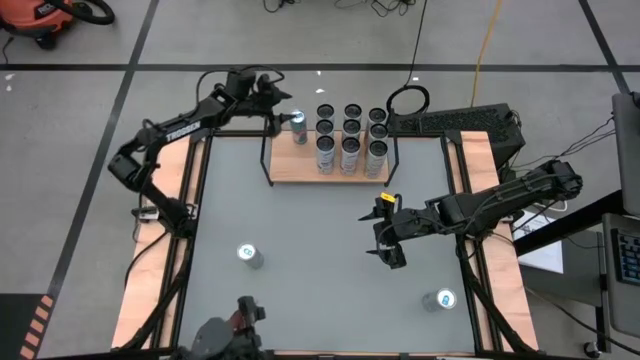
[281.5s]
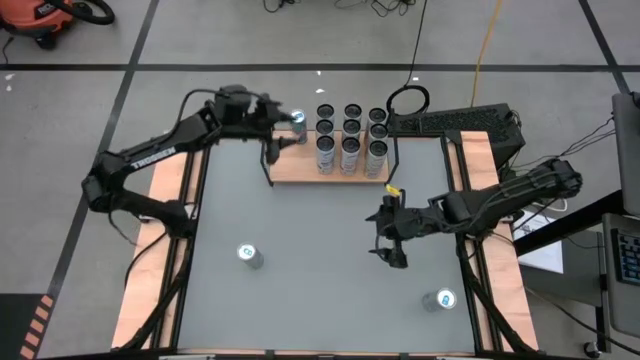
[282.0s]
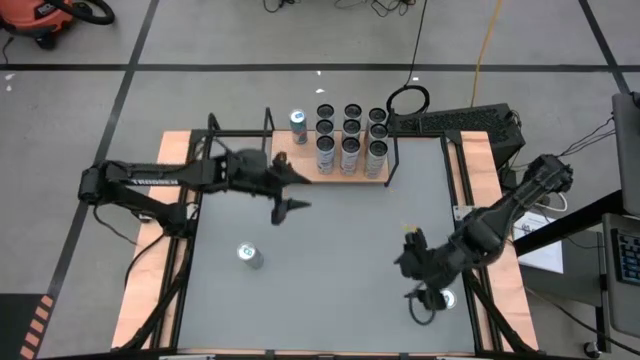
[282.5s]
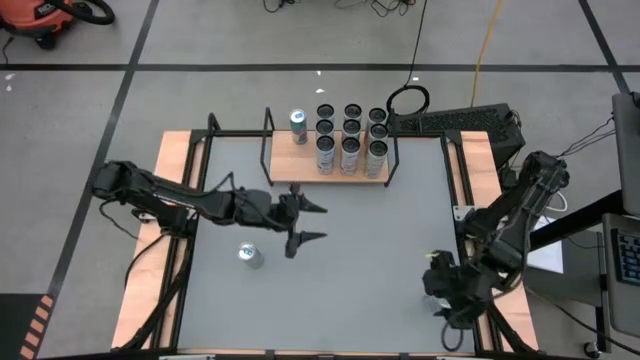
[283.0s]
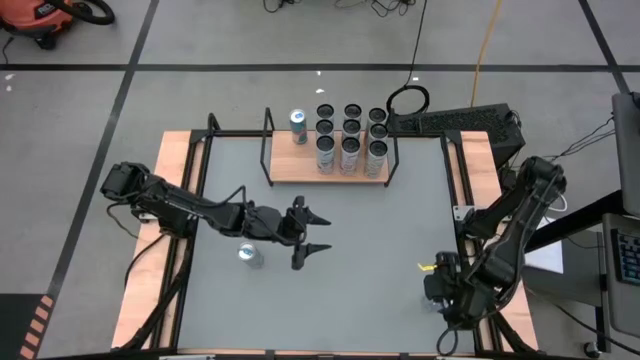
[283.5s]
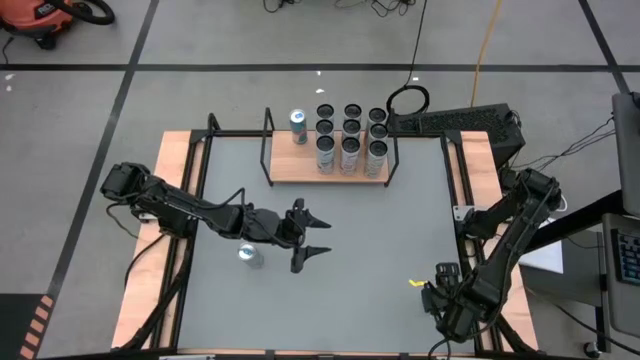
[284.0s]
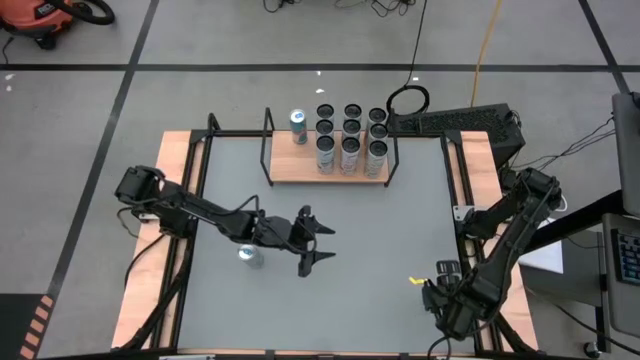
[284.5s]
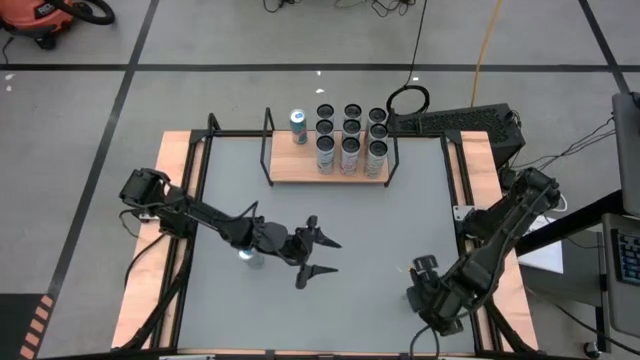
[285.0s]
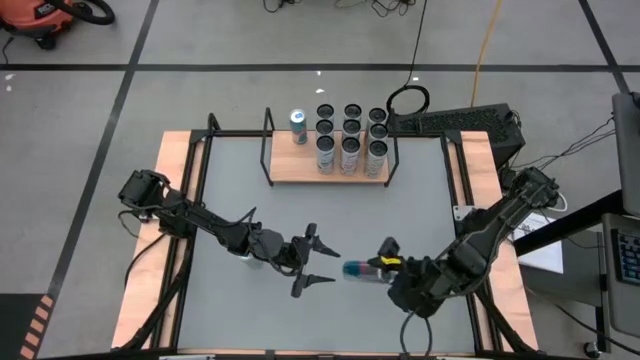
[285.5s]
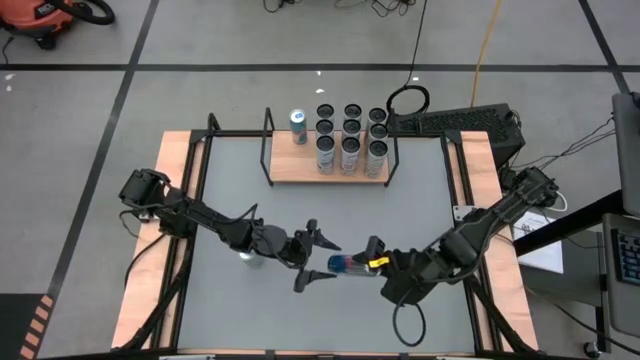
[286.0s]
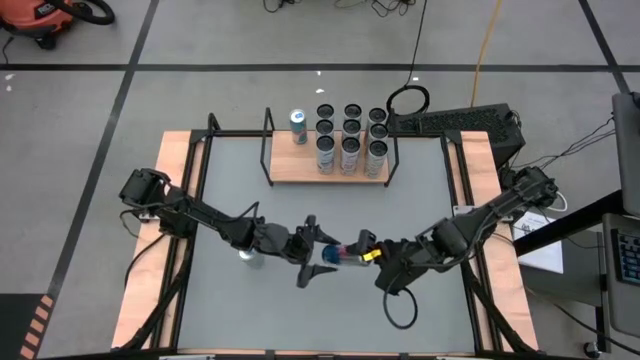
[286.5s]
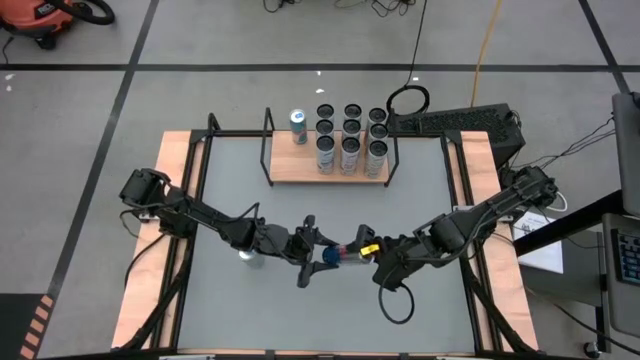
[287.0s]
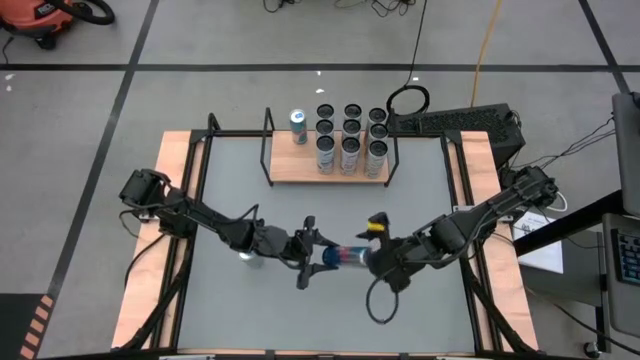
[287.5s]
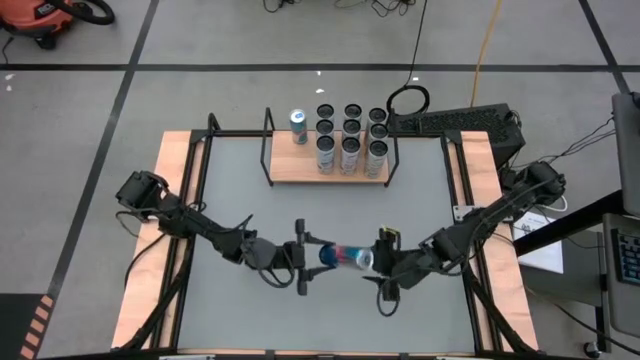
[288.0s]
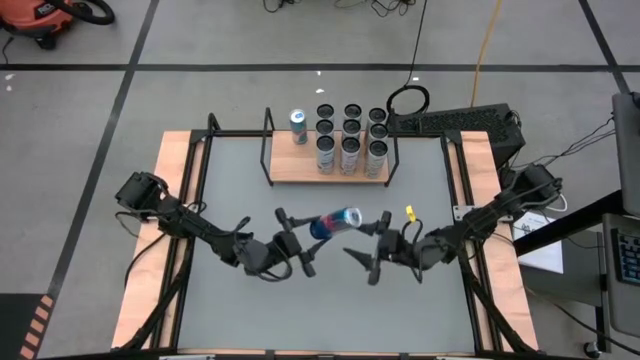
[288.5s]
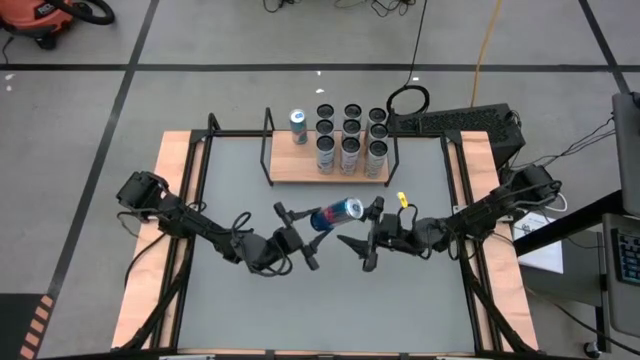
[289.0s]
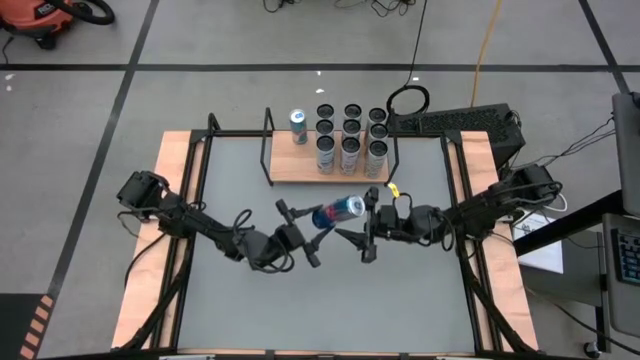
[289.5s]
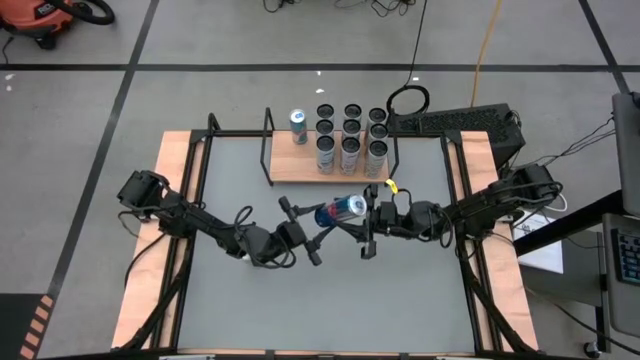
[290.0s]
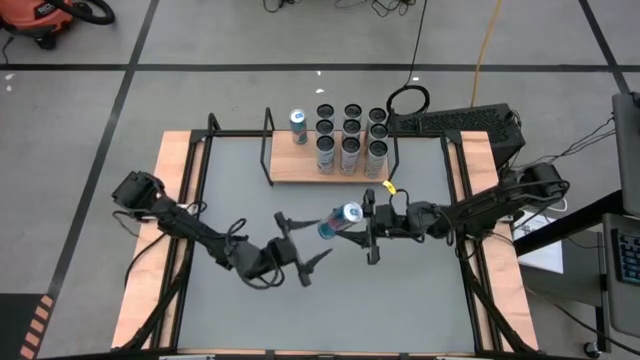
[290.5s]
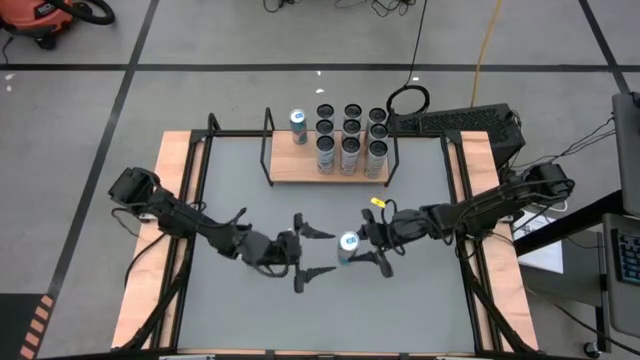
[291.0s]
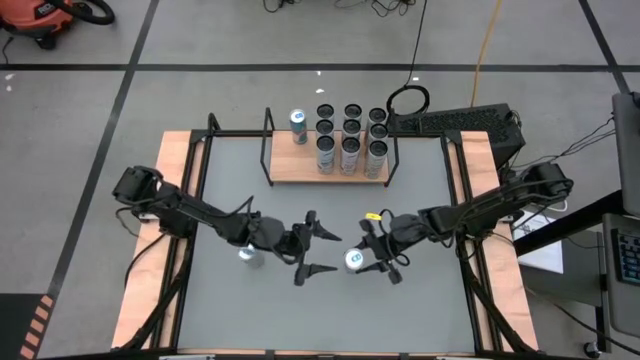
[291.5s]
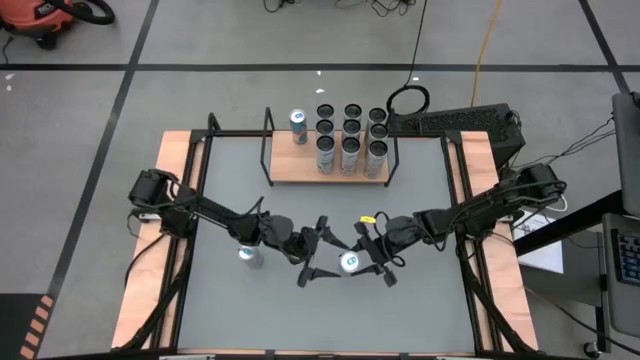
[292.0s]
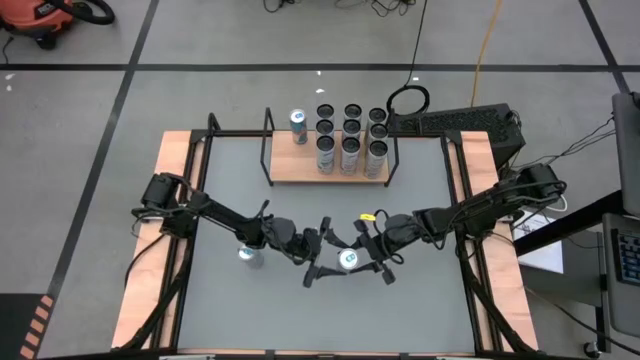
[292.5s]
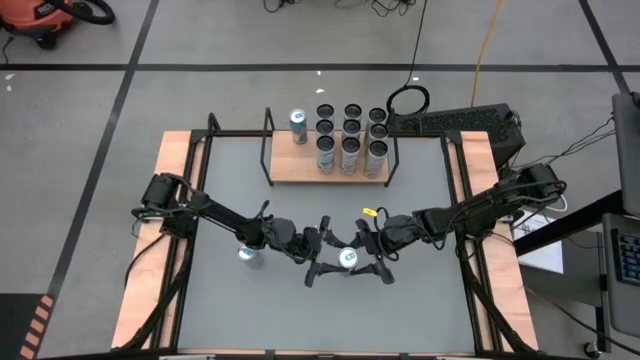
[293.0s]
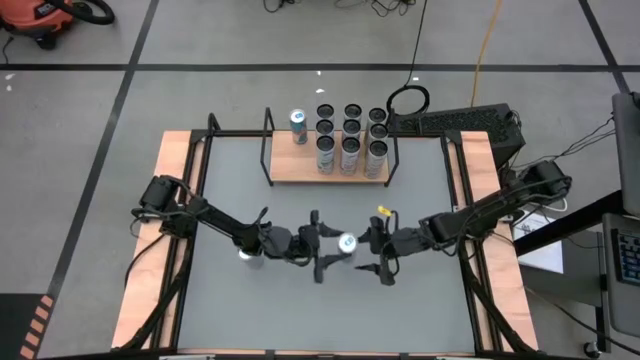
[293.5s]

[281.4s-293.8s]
Task: Place canned beverage on shelf
Put the bottom blue soda can on the shelf aligned with the blue soda can

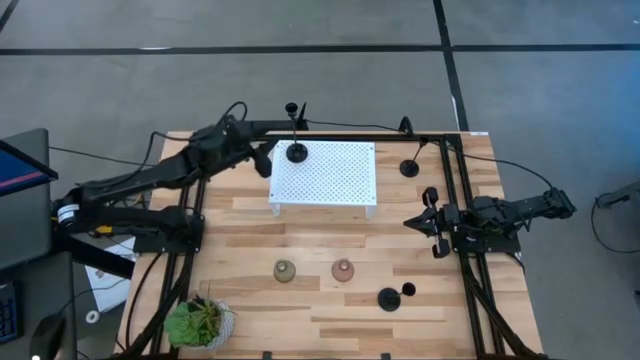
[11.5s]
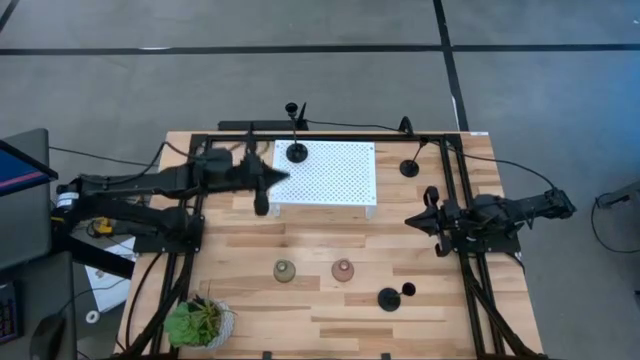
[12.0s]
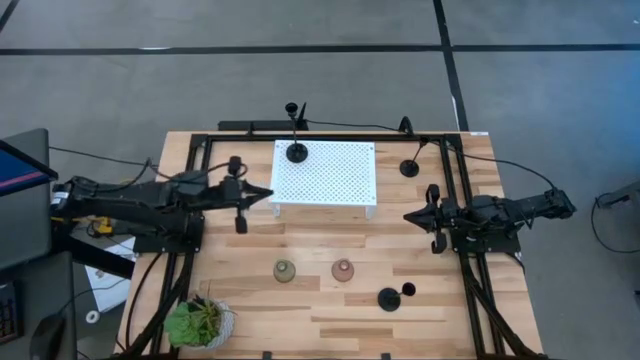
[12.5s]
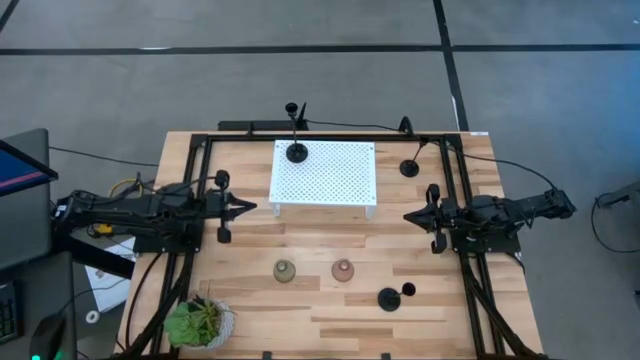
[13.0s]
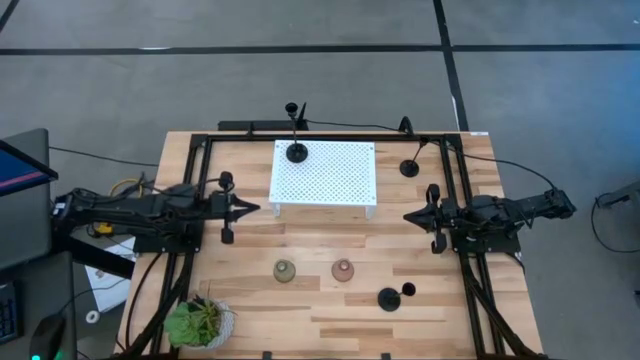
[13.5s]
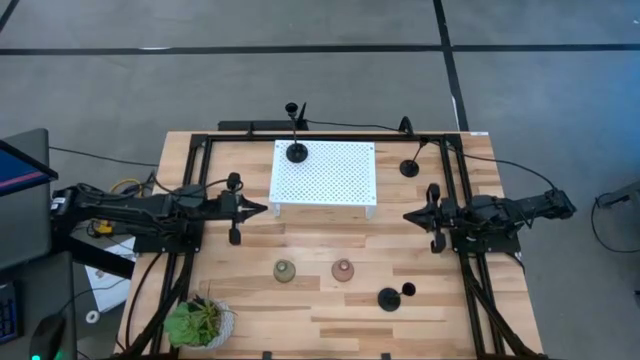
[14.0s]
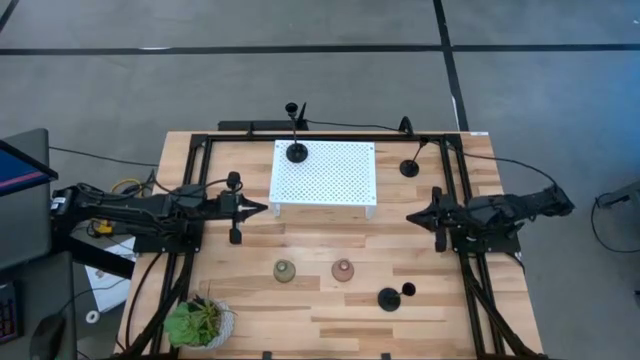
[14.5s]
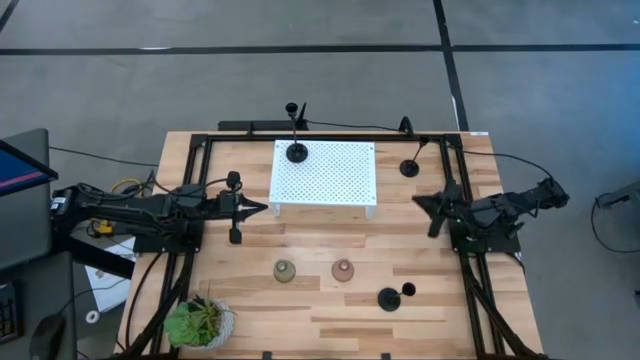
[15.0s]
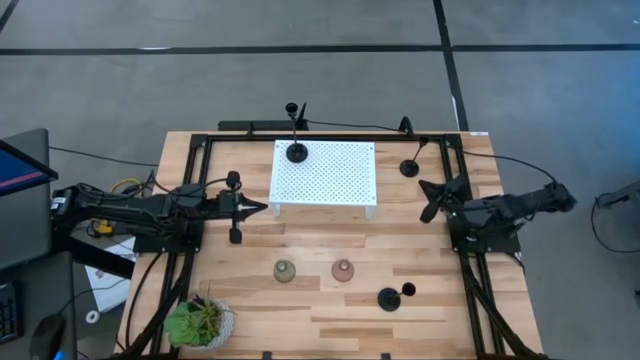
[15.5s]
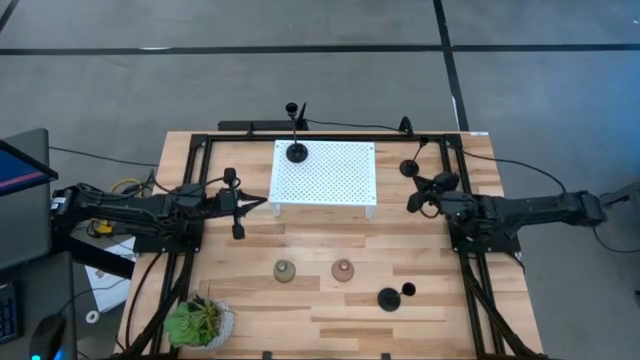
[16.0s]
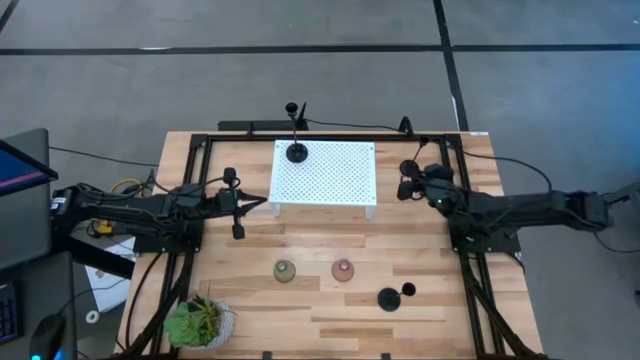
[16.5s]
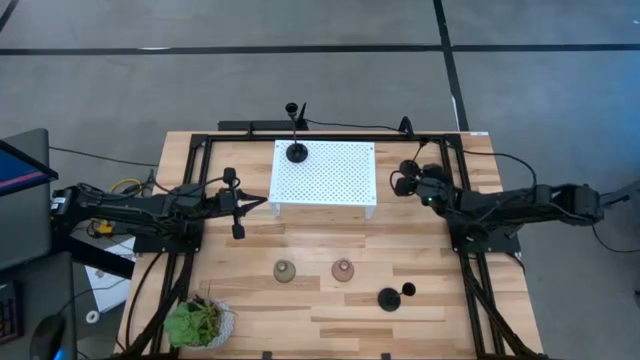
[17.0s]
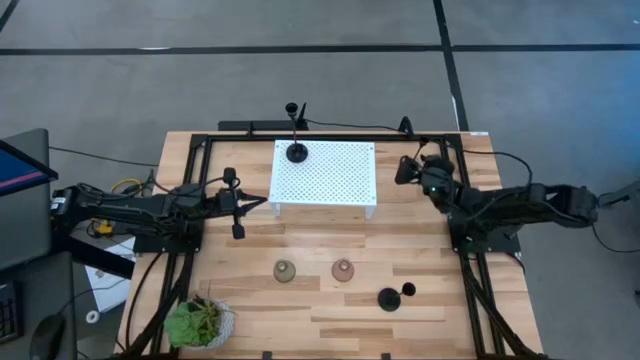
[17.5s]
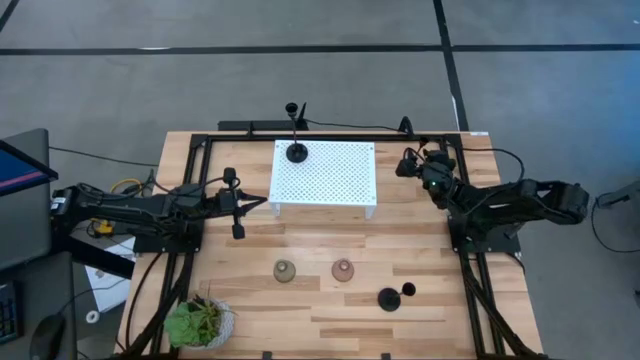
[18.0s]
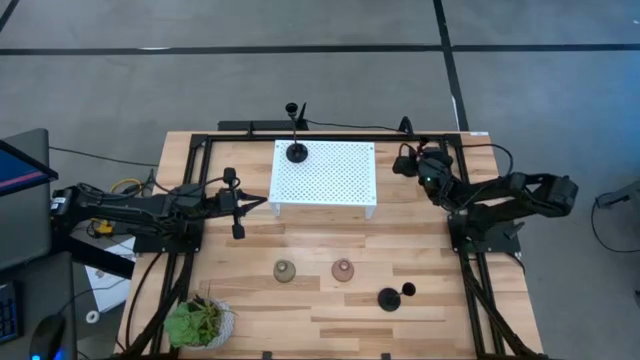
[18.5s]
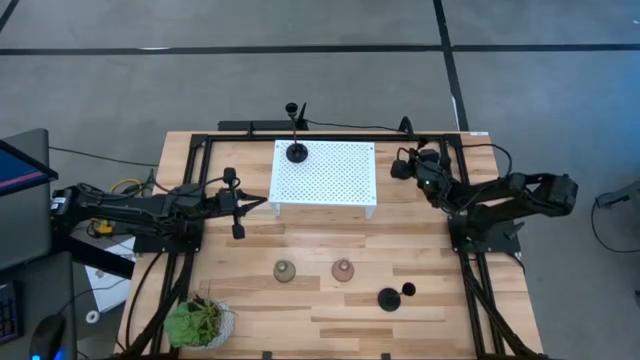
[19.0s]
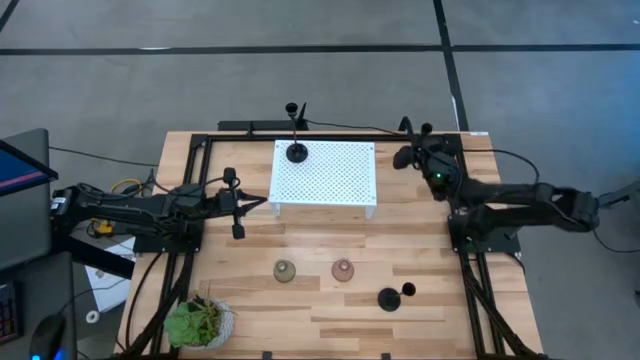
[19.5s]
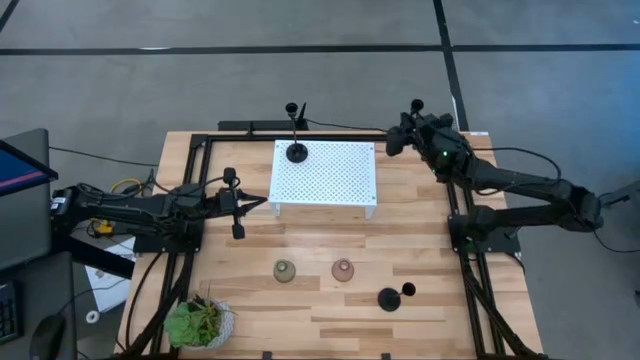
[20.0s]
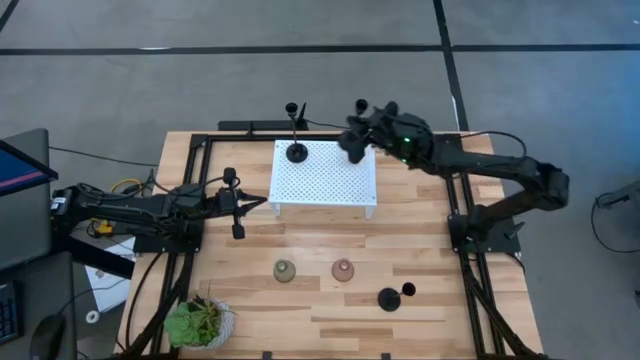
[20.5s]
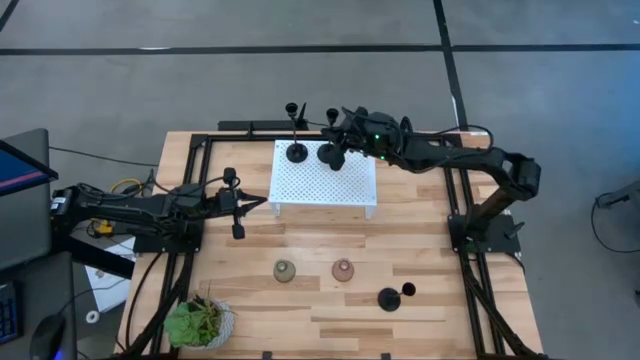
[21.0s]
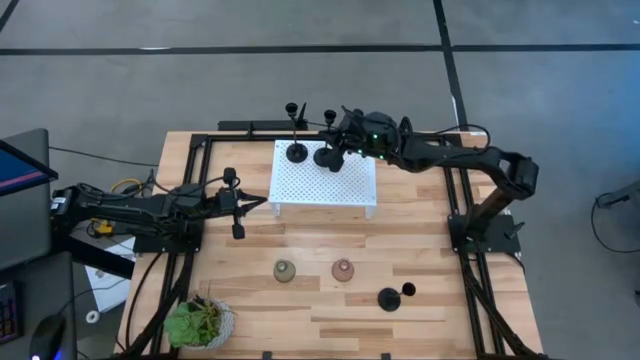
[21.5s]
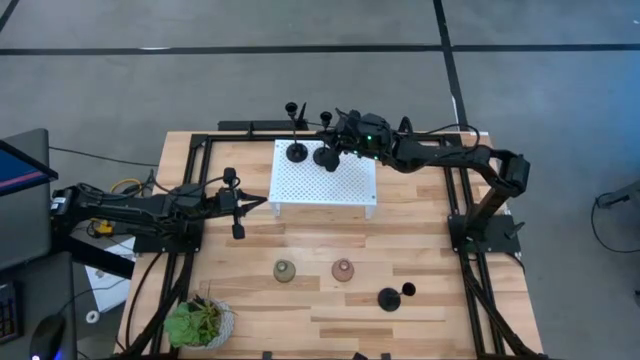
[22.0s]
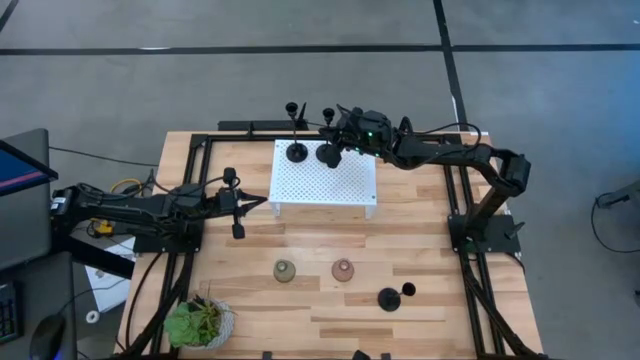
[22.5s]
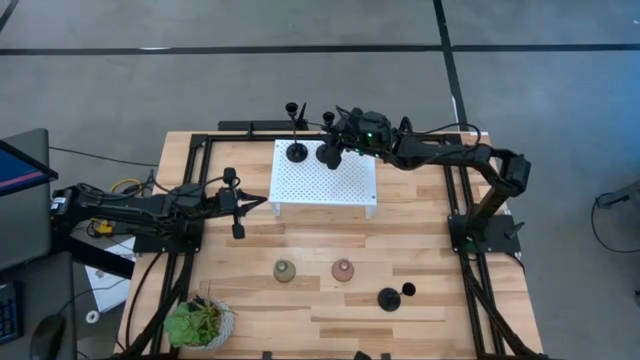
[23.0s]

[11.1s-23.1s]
Task: Pick & Place candle stick holders
Put the top black candle holder on the shelf
